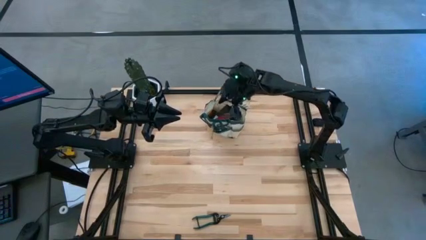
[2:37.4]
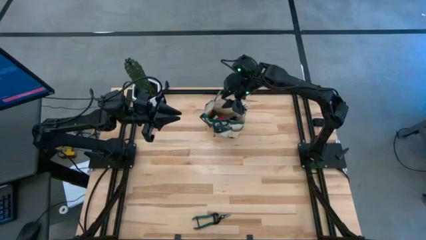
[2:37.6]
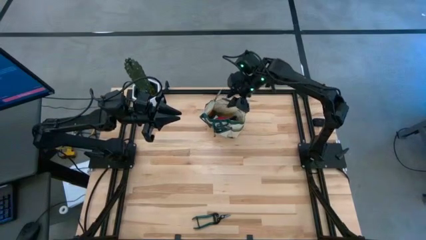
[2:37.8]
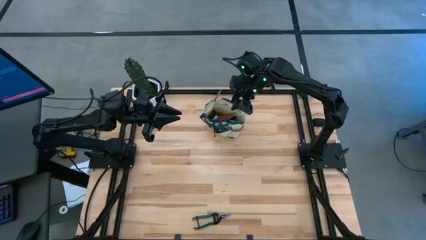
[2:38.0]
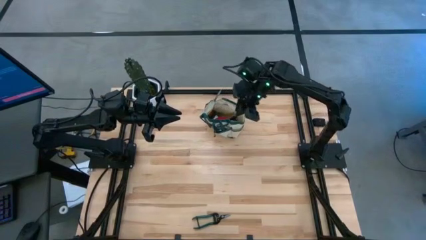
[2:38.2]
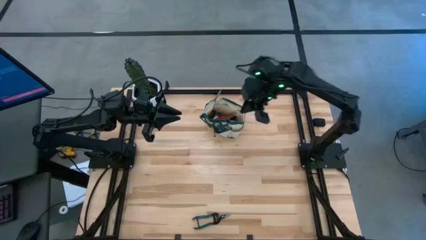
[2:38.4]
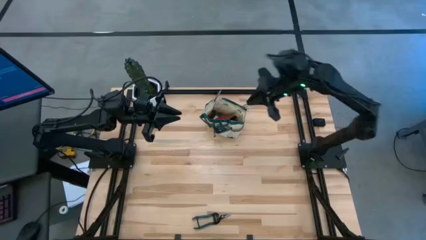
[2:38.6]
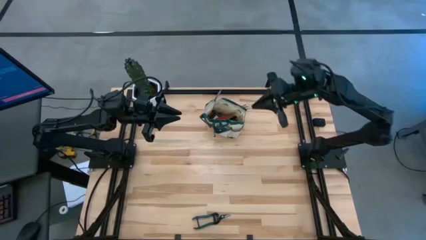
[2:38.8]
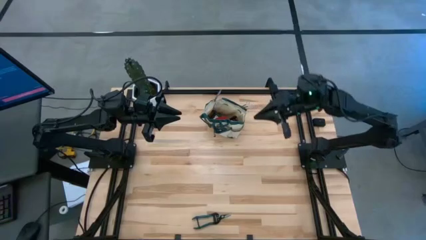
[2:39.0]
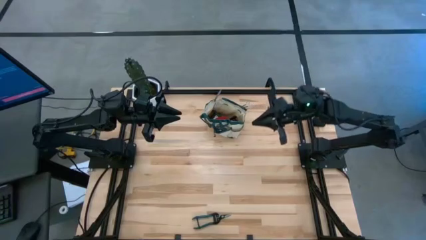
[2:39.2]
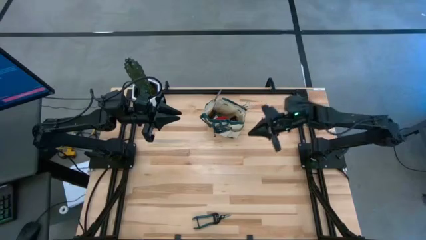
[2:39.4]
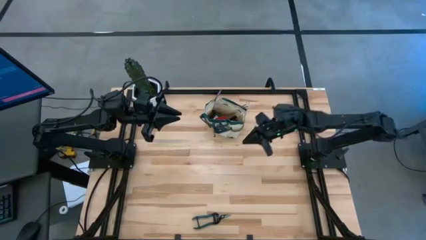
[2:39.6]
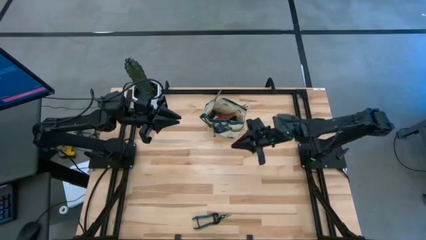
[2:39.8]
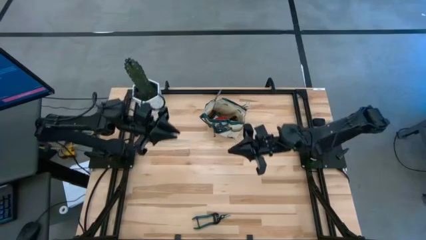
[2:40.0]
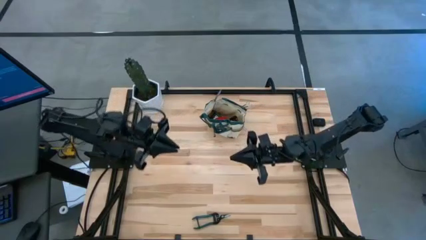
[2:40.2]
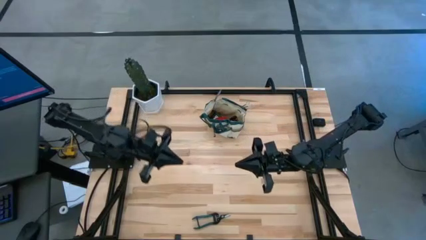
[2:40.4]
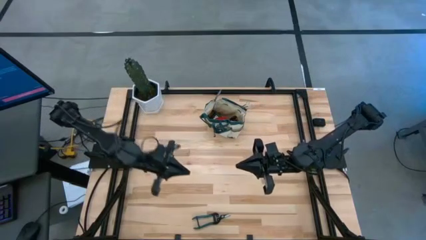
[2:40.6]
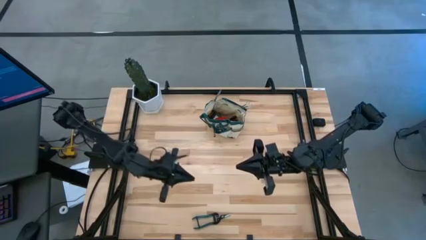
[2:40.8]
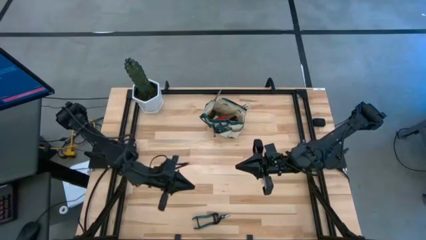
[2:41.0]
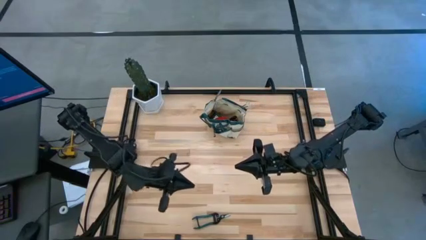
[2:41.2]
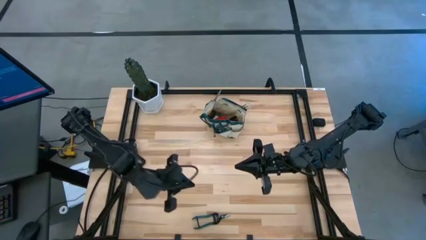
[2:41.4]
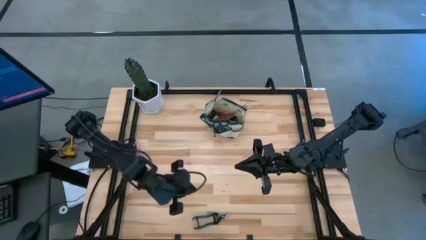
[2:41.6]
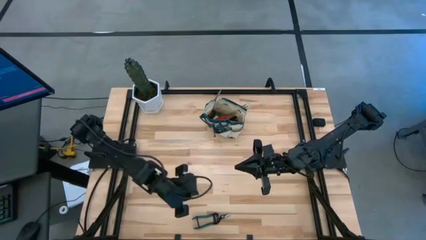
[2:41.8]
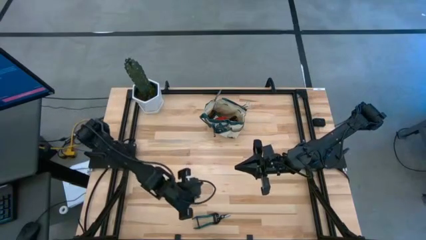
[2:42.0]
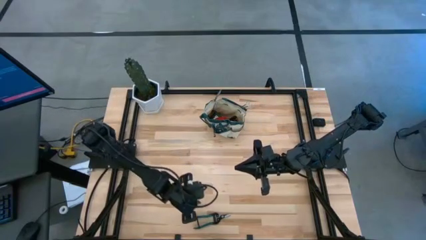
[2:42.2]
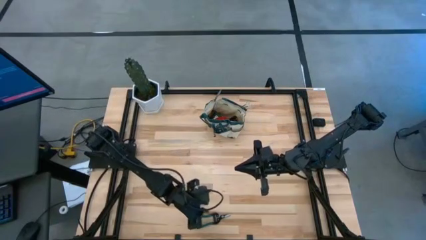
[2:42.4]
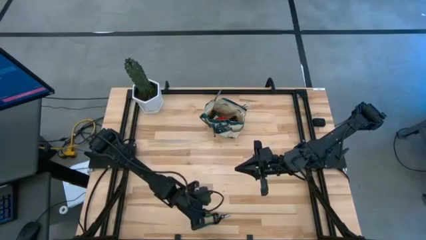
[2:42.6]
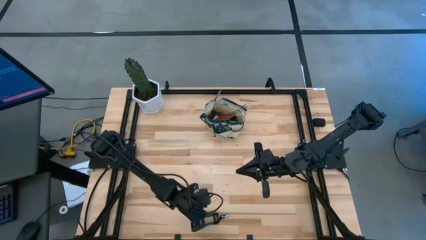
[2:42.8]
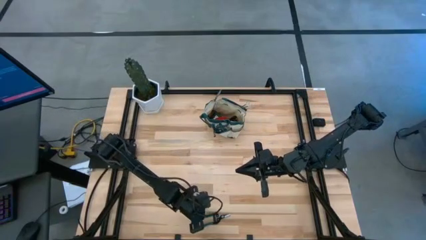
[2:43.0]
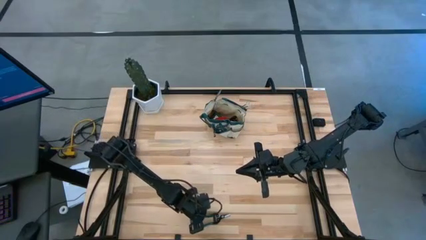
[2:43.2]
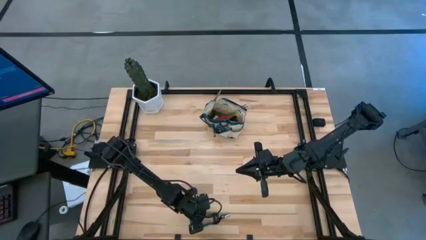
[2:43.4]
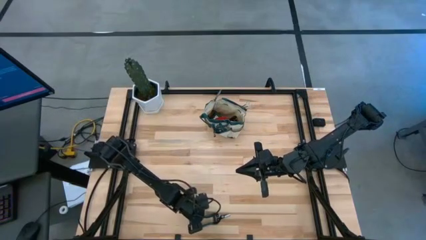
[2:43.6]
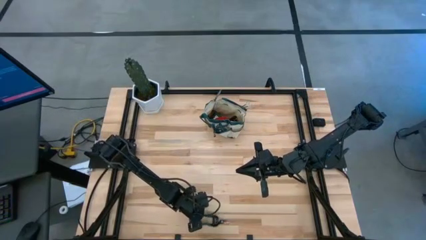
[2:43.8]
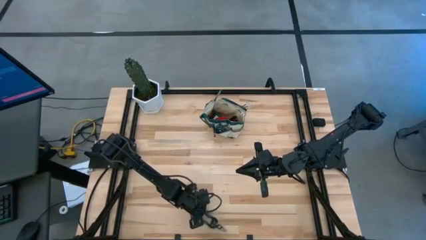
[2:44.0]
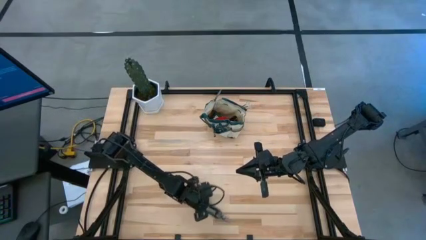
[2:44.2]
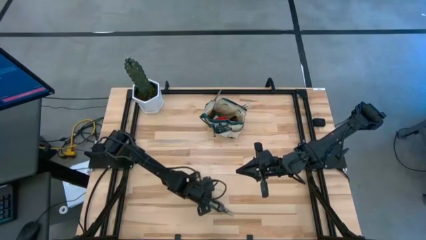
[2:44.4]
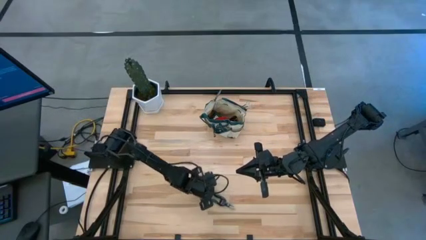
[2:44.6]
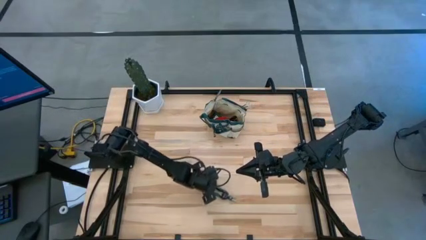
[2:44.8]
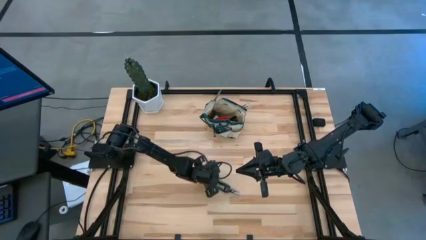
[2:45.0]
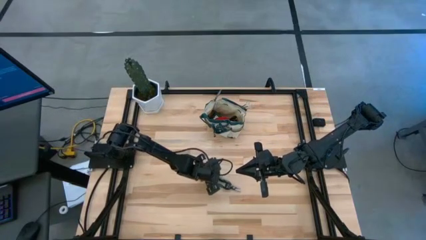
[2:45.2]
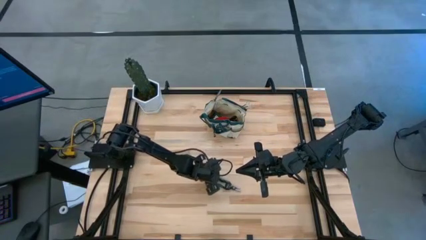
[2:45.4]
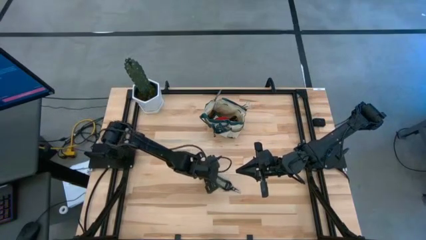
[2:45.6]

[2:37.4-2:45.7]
Task: Pick & Place Garden tools in Gardening bag
Move the garden pruner to the center of the table

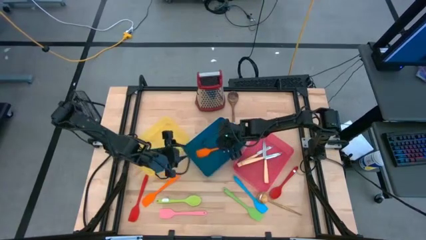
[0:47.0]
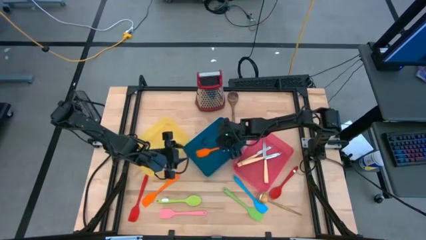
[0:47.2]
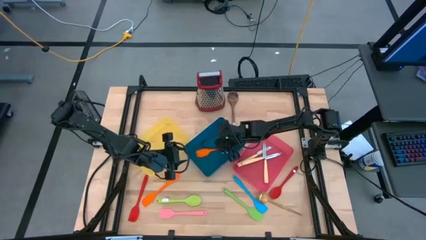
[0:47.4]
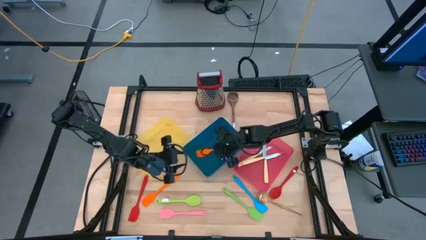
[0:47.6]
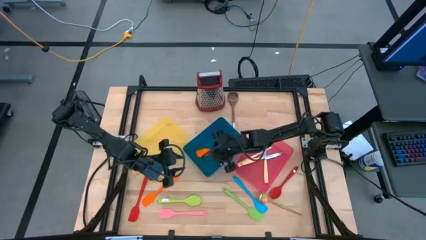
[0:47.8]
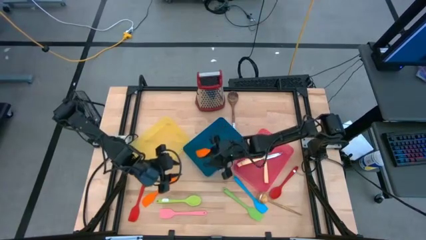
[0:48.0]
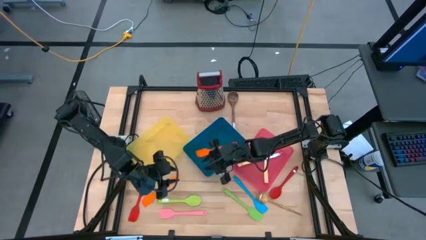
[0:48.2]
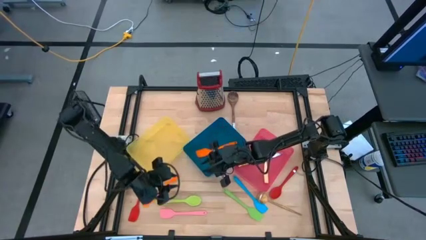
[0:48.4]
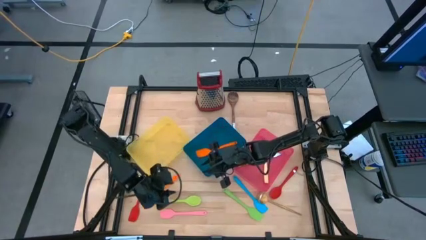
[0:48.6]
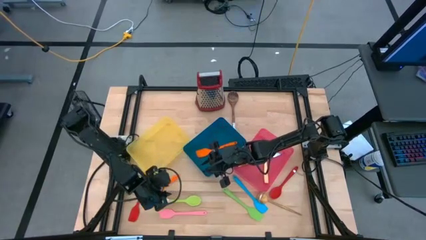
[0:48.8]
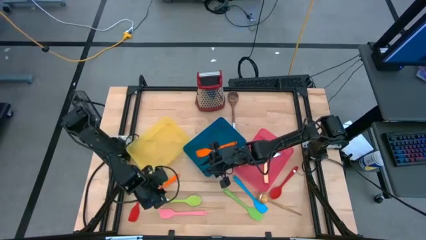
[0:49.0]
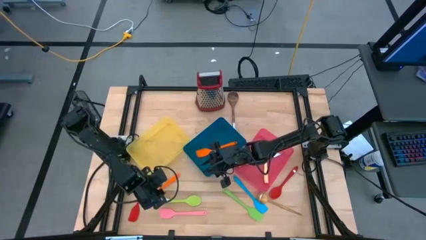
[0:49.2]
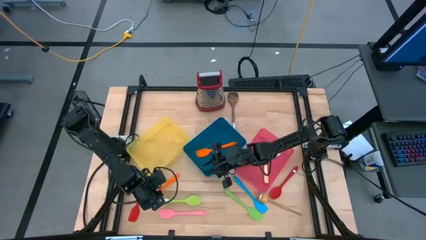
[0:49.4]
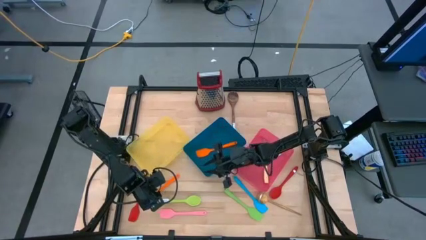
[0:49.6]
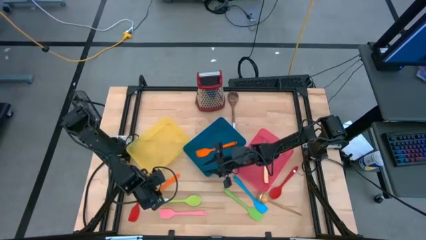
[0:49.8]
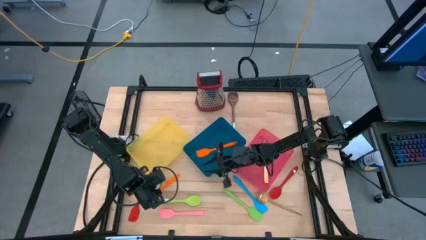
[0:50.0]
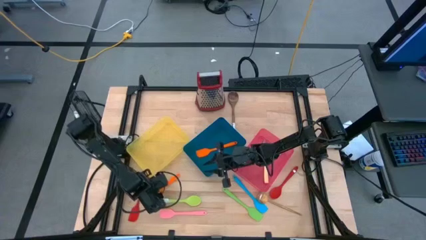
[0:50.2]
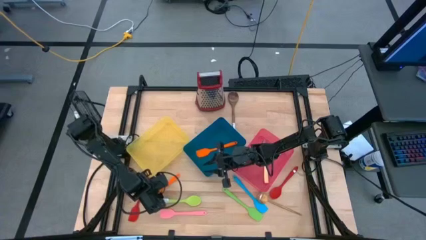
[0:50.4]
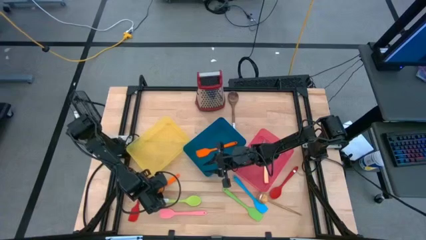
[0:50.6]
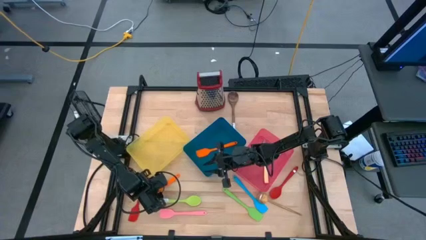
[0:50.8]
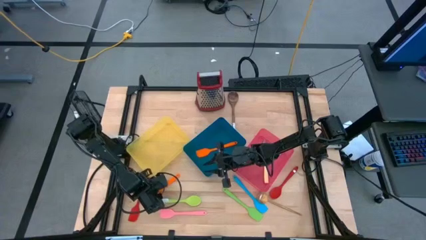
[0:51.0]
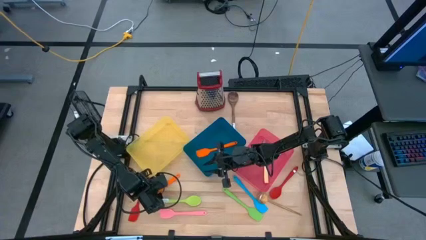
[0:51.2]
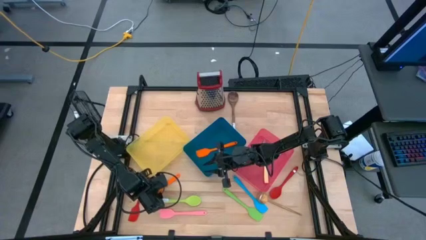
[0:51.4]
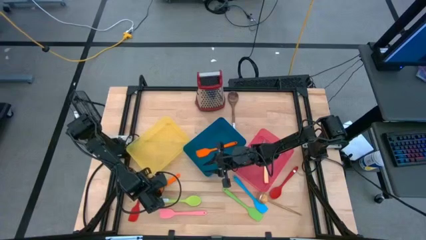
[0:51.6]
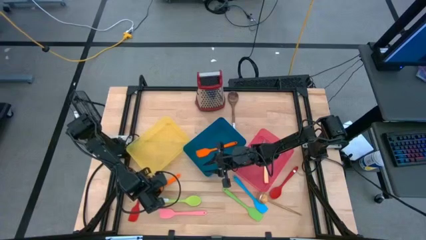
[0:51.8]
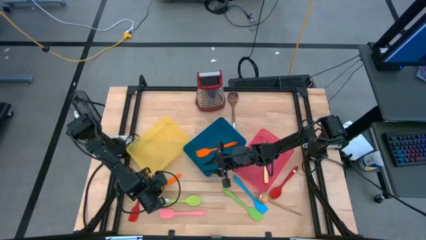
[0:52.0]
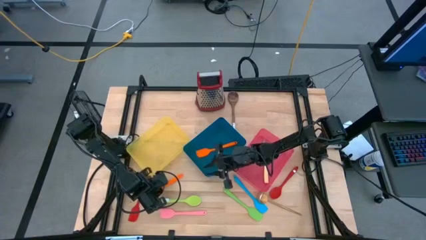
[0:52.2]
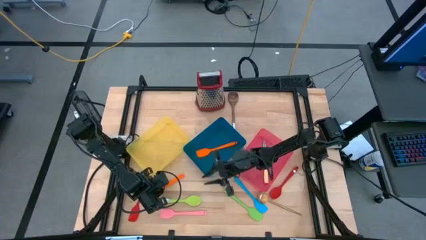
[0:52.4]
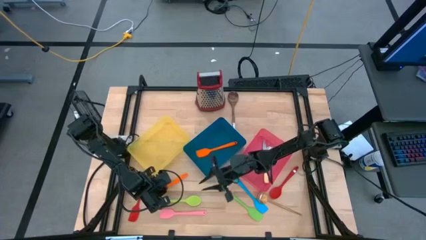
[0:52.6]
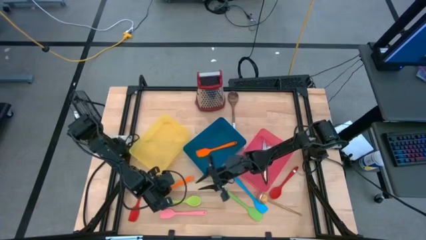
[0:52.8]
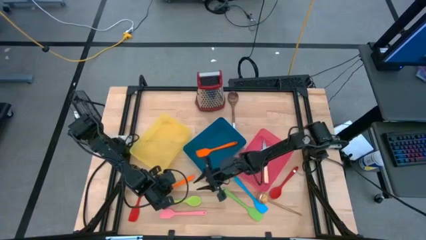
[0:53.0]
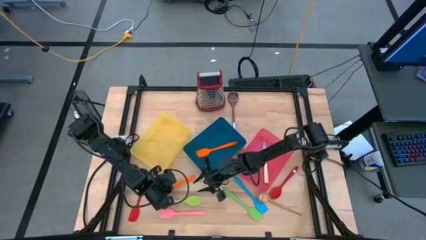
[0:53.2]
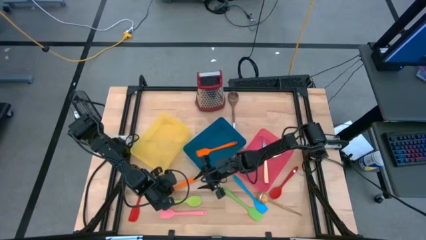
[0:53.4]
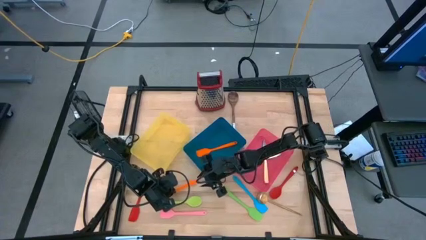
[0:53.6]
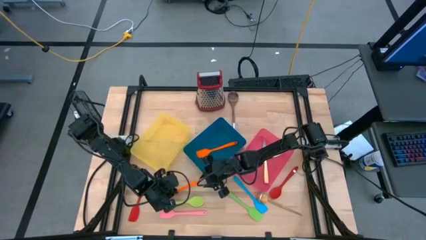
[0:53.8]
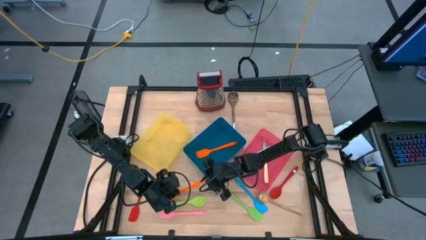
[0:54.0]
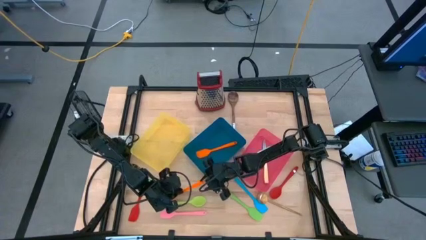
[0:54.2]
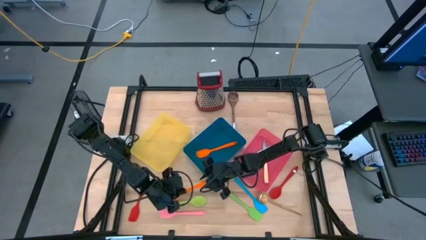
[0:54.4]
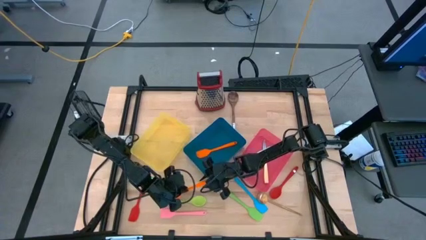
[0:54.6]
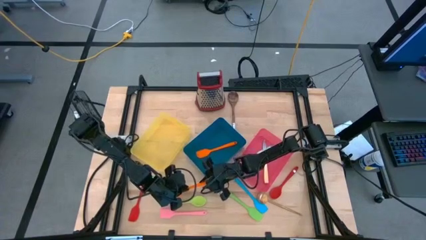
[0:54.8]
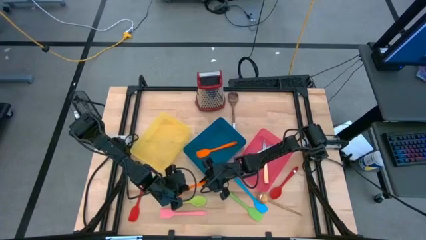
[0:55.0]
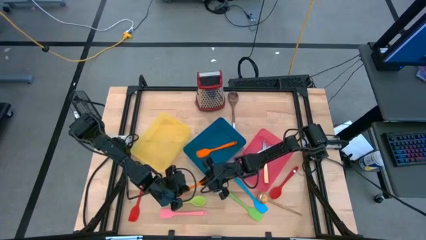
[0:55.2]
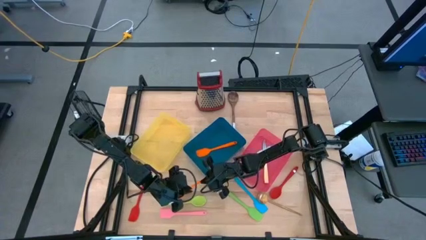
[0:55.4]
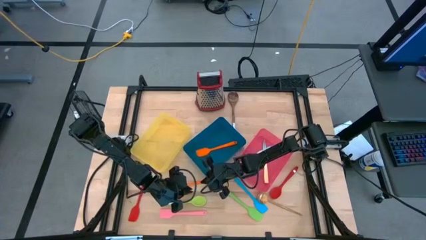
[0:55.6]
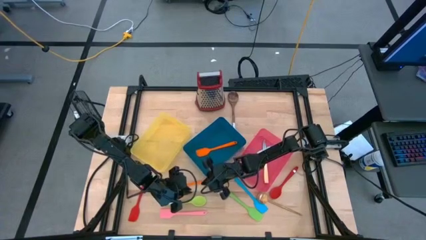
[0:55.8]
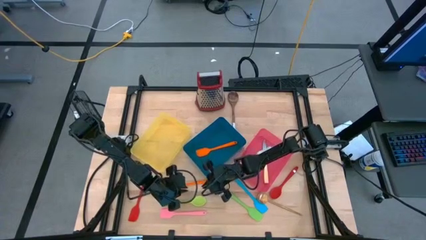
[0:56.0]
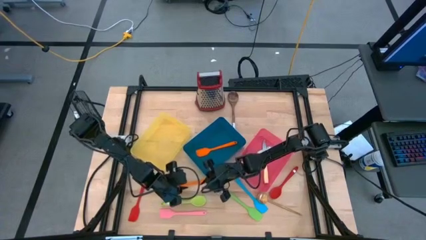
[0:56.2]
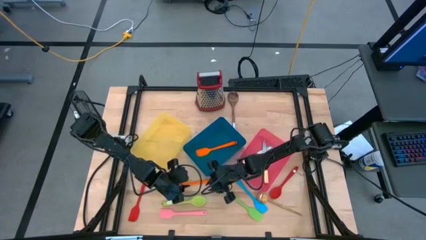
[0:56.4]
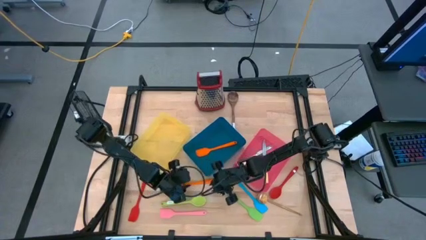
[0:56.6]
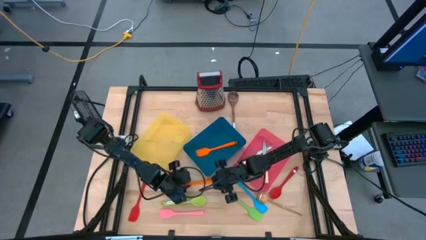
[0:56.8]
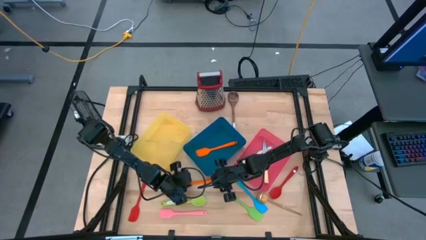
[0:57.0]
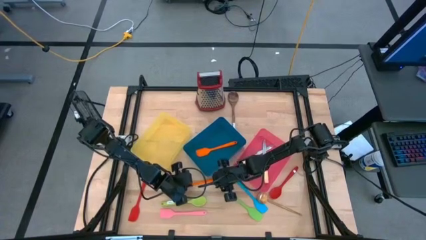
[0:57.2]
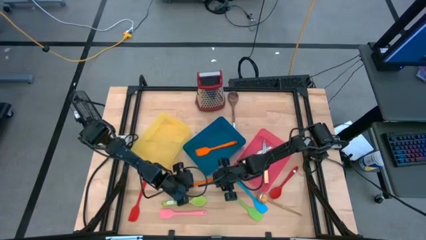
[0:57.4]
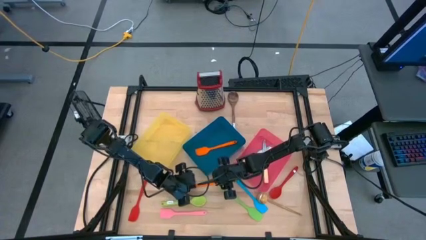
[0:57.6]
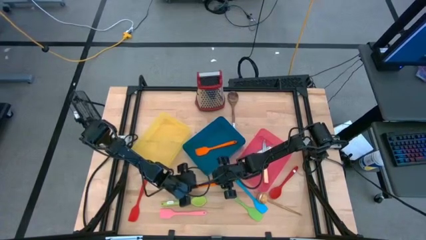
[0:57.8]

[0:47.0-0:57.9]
Task: Pick & Place Kitchen Items
Put the orange spatula into the blue bin
